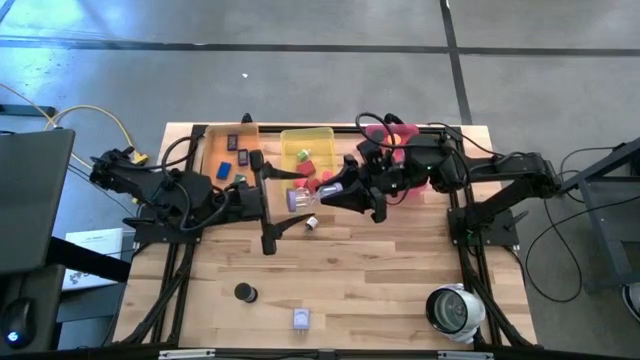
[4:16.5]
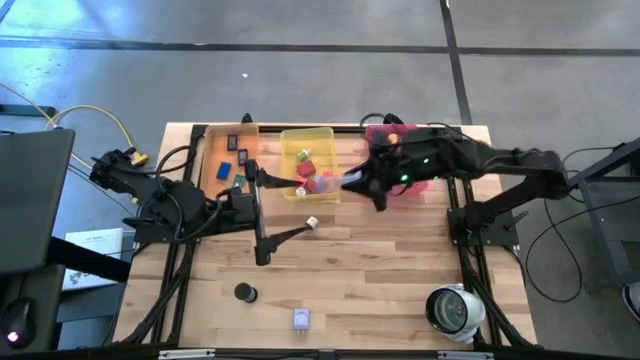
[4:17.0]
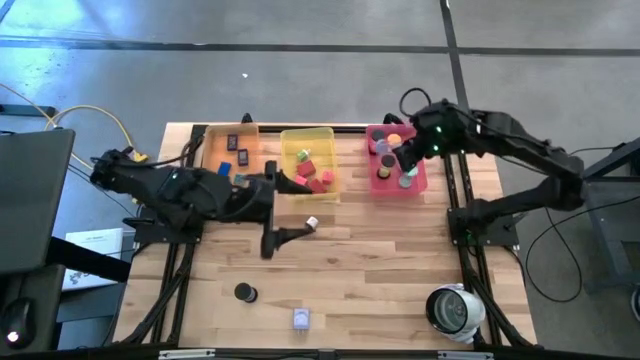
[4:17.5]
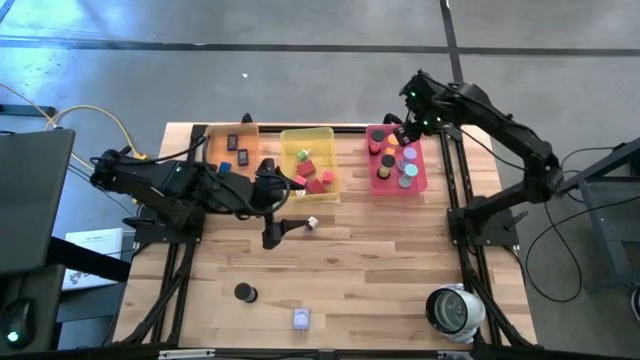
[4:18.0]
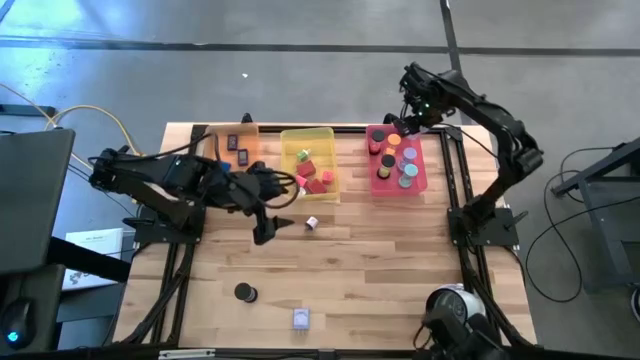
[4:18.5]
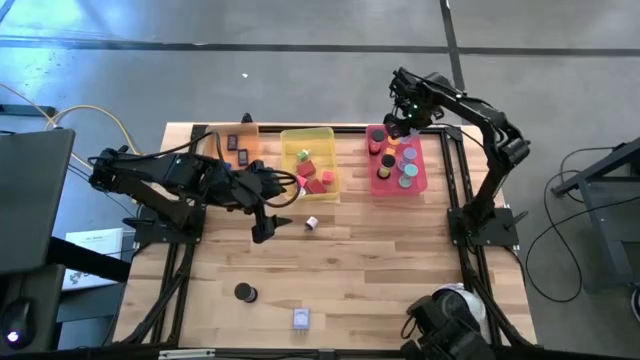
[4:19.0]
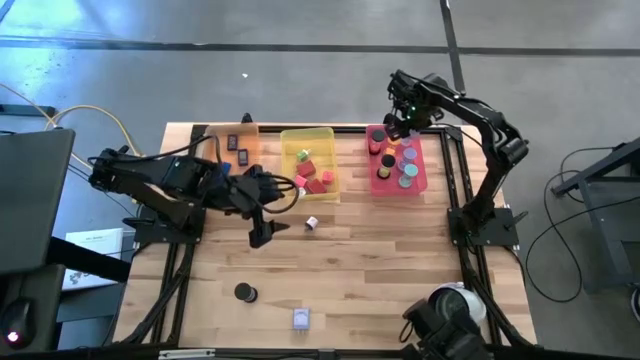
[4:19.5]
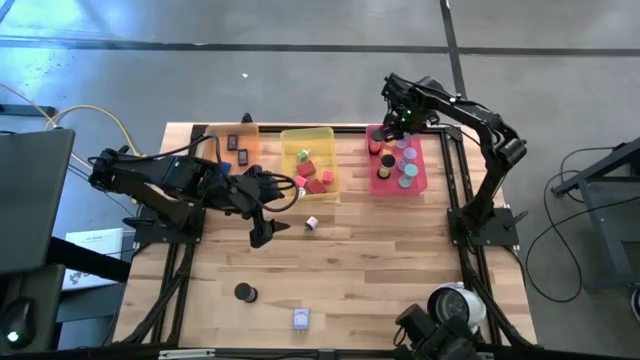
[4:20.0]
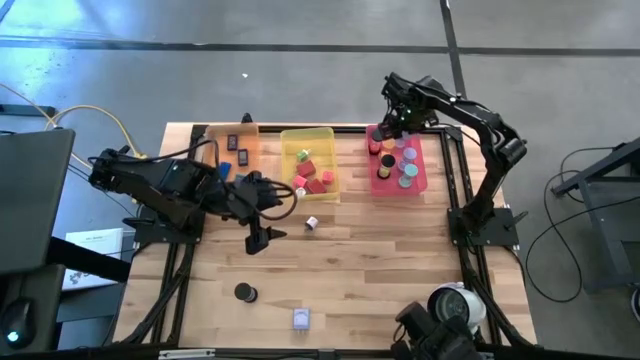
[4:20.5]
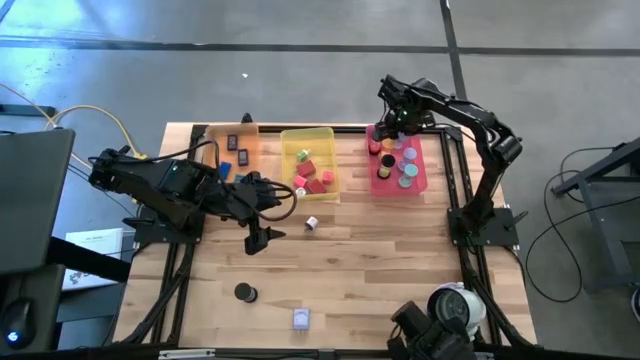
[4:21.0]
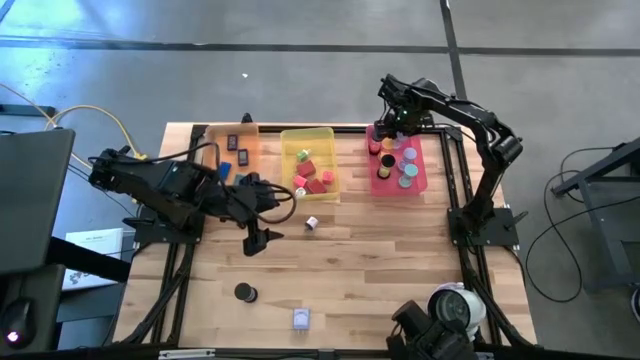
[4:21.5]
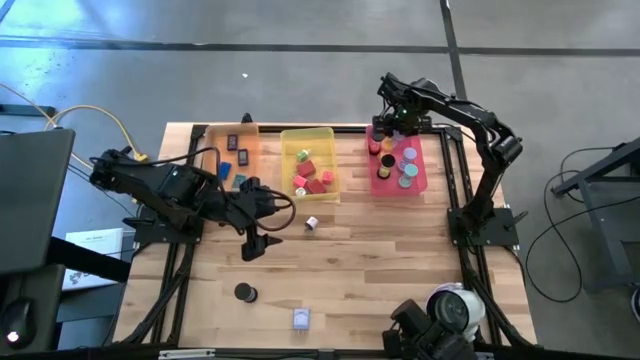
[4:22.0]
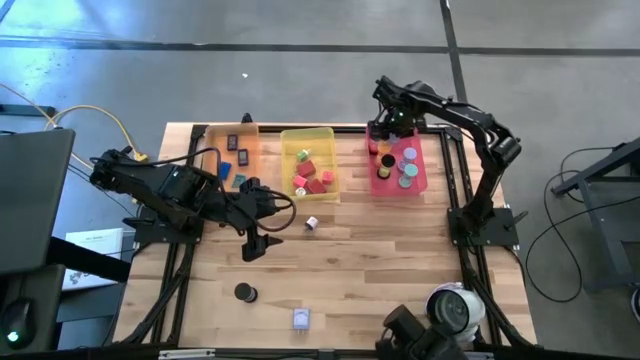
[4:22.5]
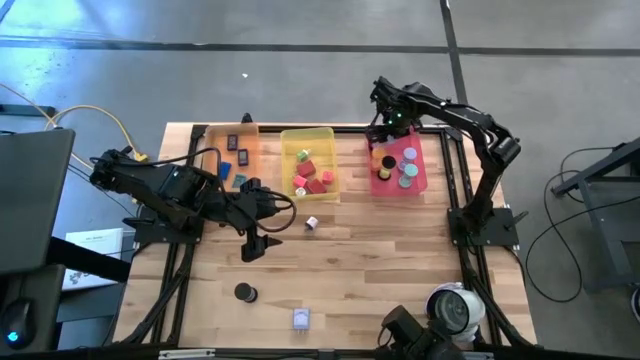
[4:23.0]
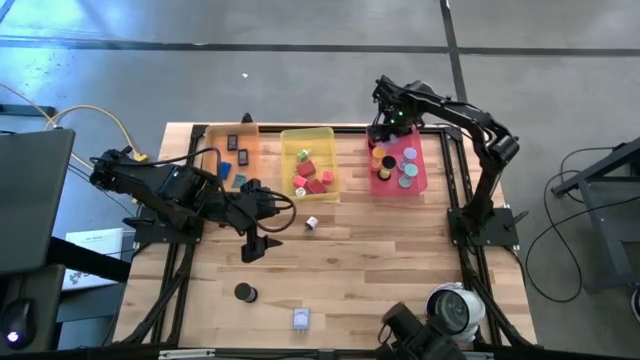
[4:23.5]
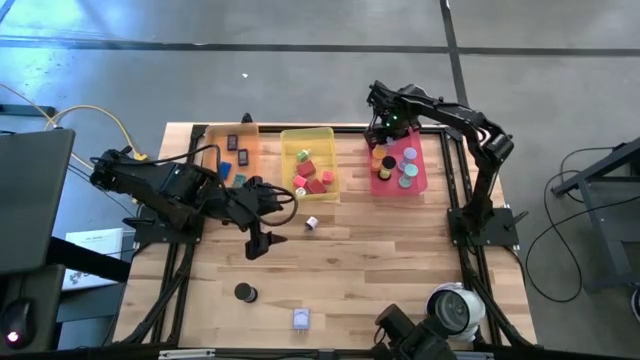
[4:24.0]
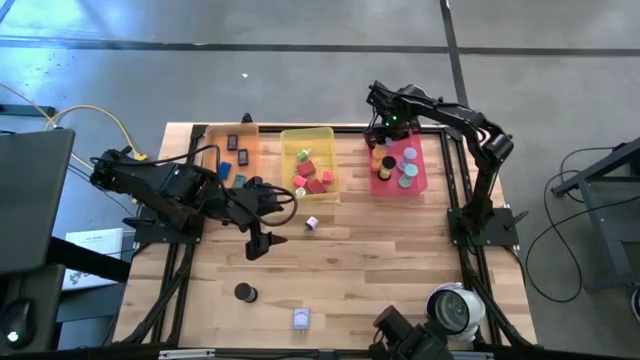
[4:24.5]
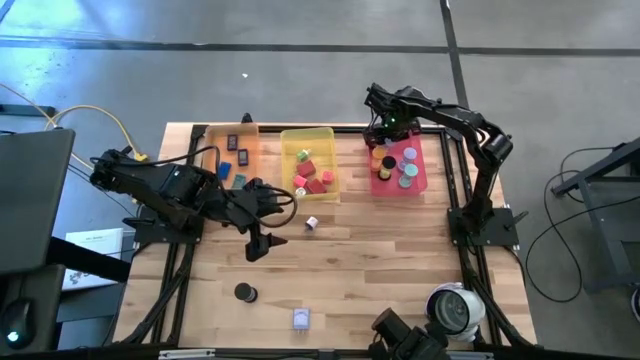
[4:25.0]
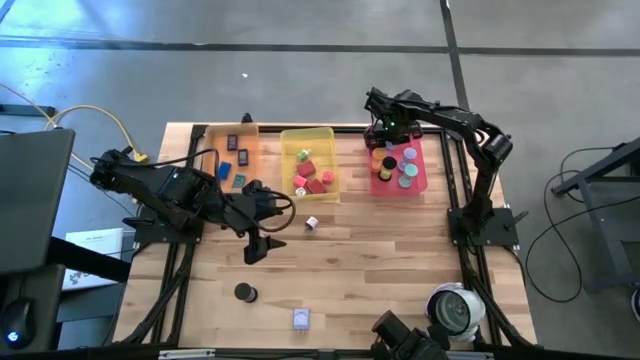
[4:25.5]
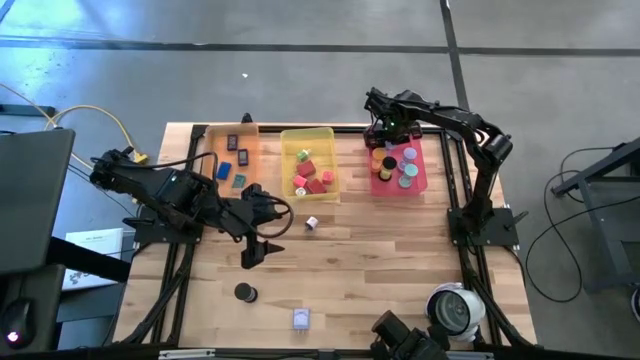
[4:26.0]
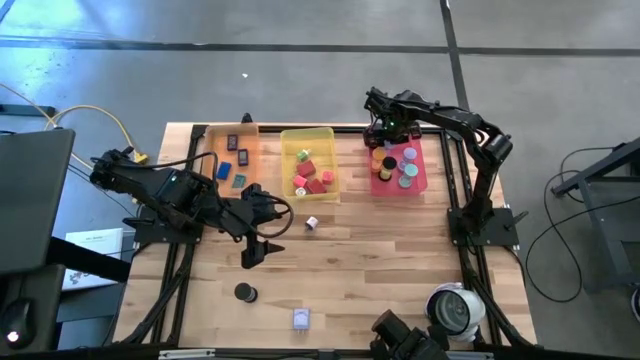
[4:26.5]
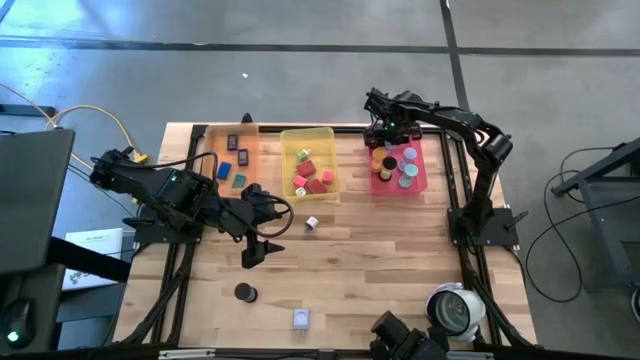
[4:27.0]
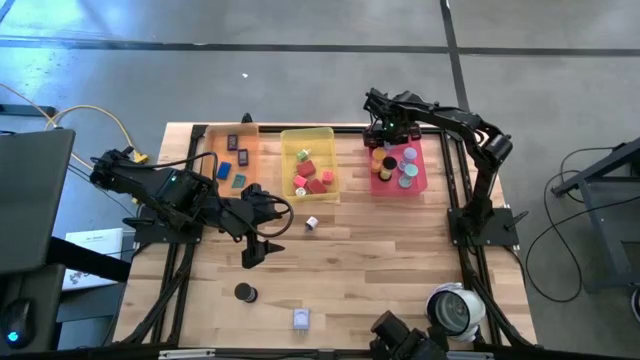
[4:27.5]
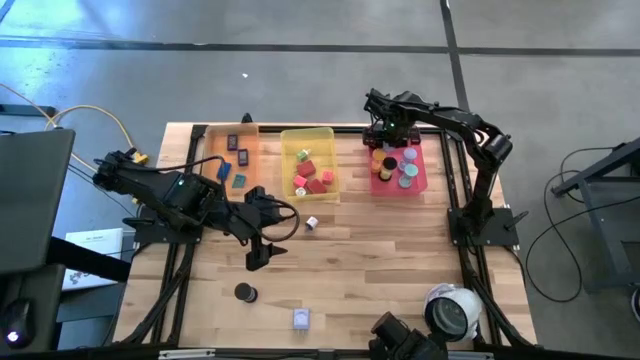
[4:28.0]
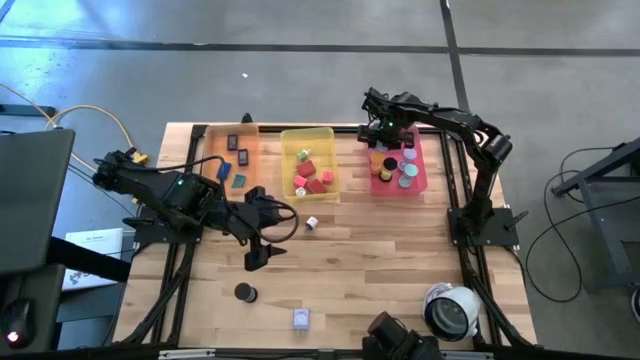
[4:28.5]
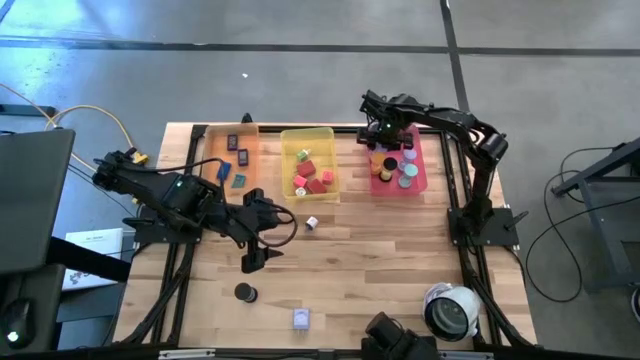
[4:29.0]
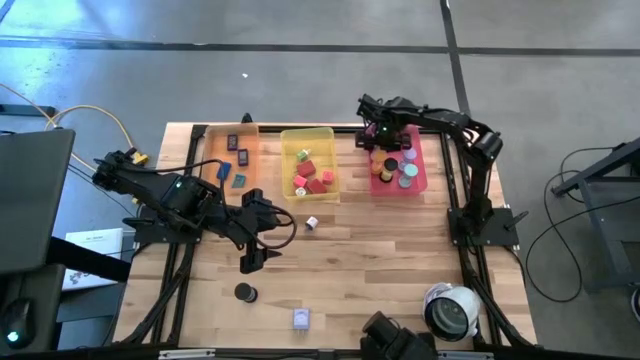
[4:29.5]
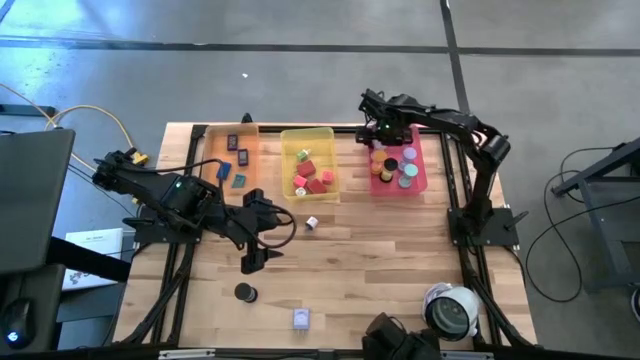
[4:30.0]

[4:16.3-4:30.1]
Task: Pick & Place Office items
Put the purple sand timer into the pink bin

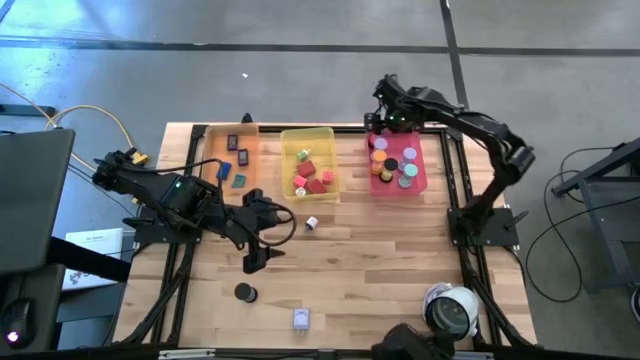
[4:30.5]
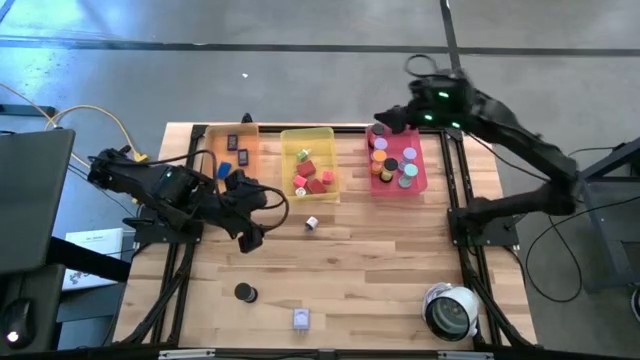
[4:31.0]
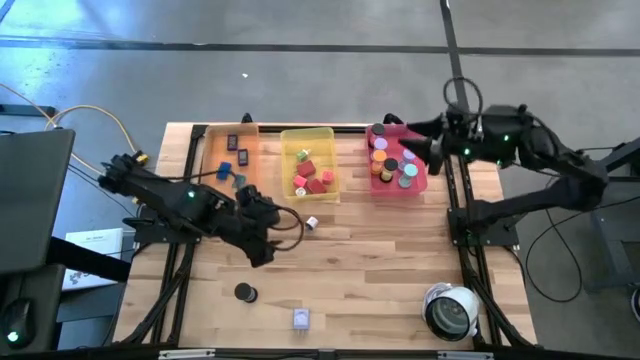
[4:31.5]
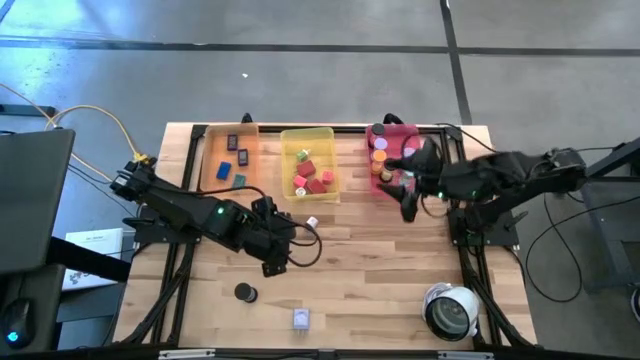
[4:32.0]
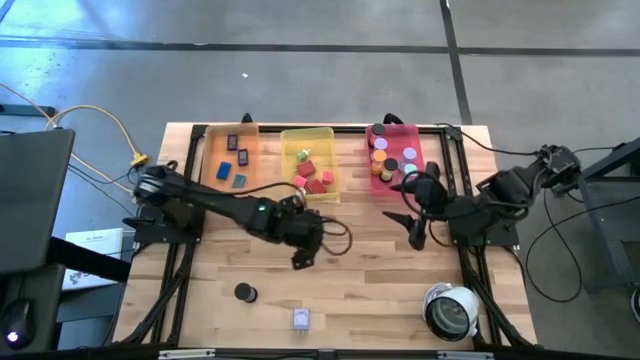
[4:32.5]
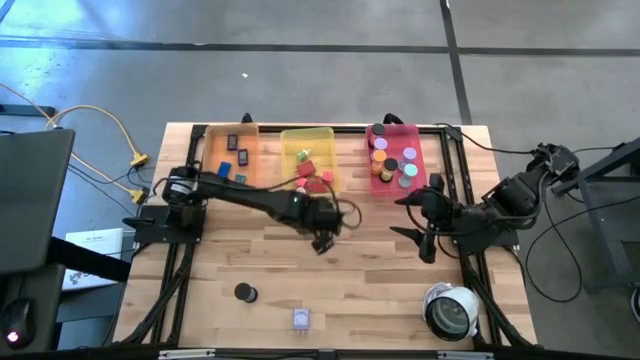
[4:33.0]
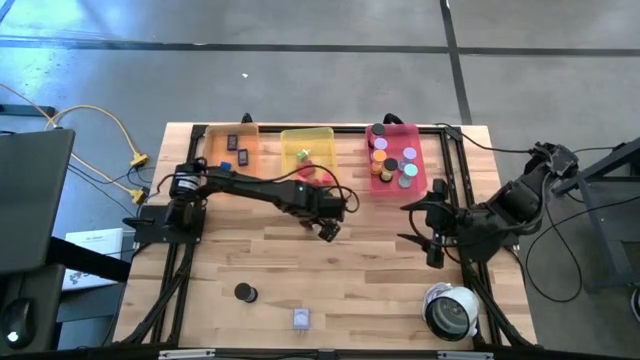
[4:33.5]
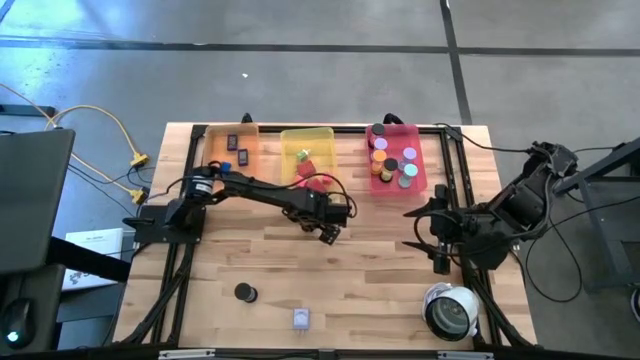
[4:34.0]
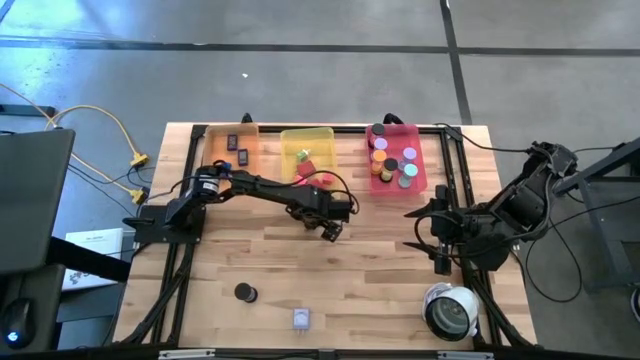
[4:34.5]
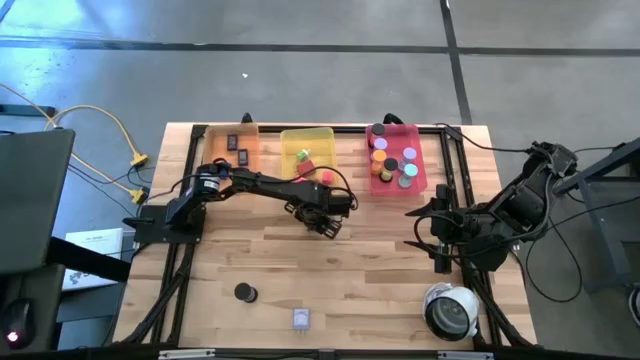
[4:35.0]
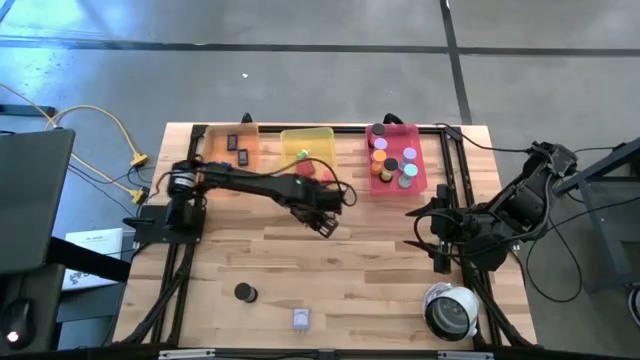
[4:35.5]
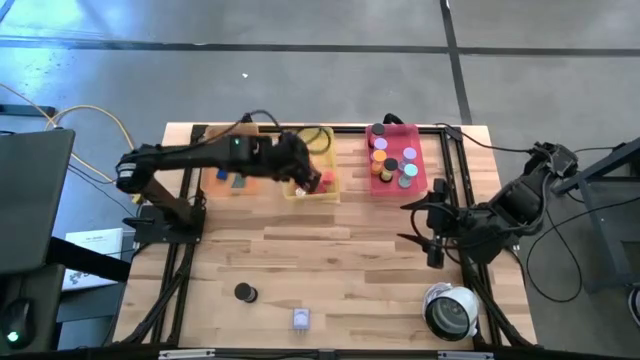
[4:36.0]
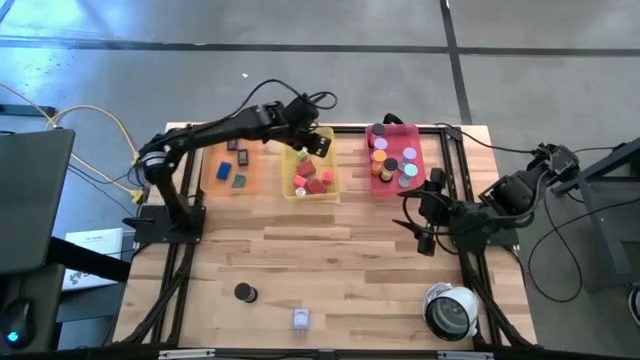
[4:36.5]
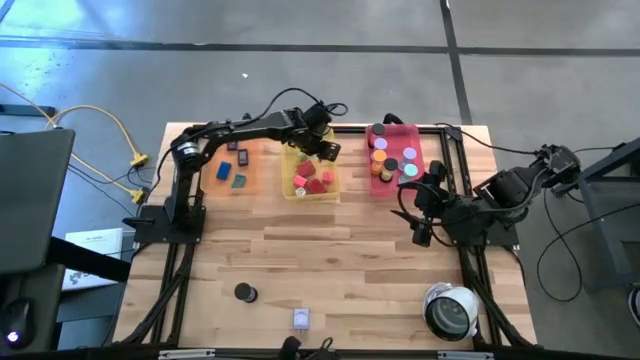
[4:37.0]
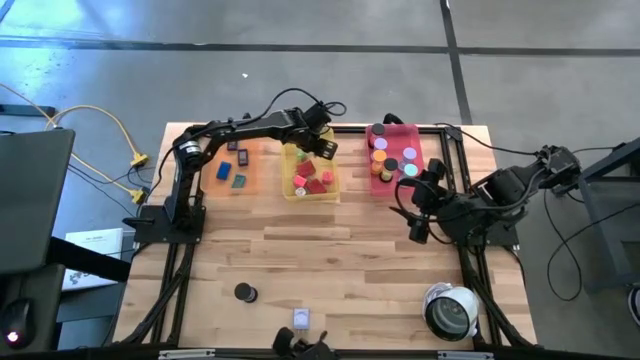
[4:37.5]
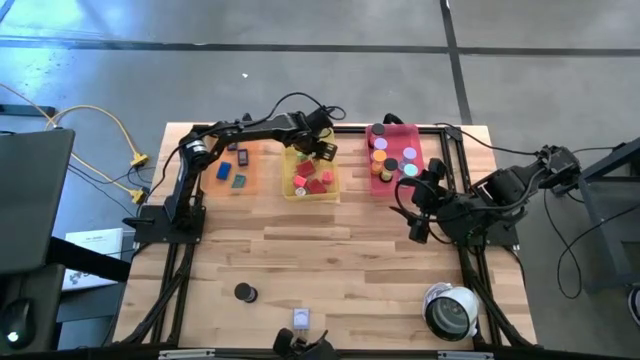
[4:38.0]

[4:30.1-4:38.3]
Put the white charger adapter into the yellow bin
